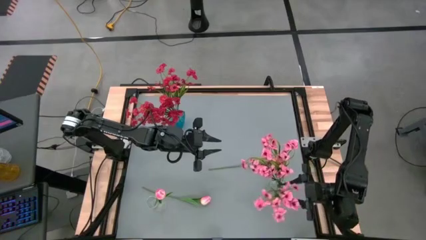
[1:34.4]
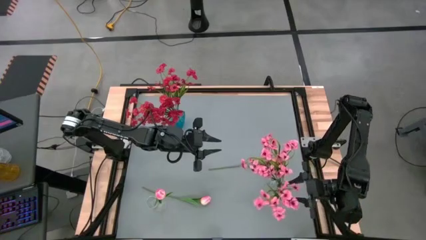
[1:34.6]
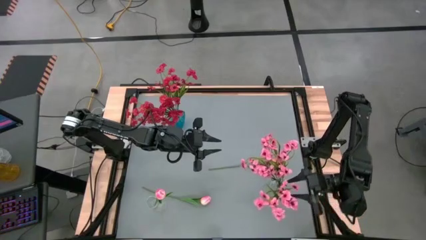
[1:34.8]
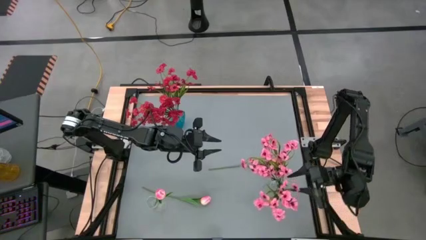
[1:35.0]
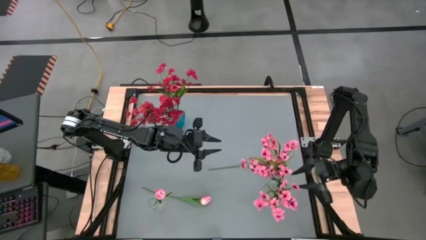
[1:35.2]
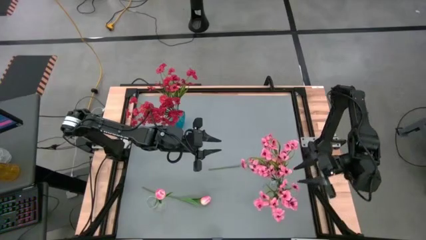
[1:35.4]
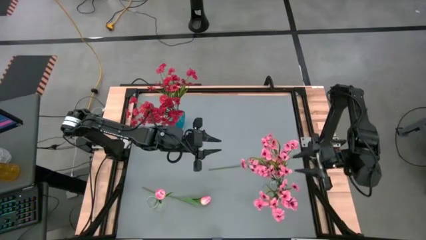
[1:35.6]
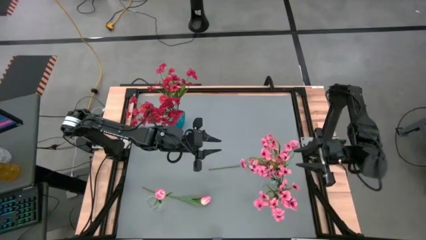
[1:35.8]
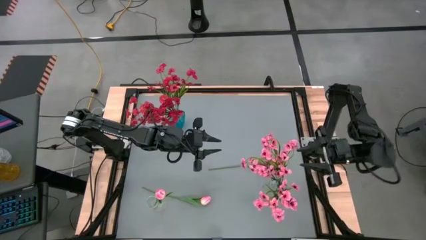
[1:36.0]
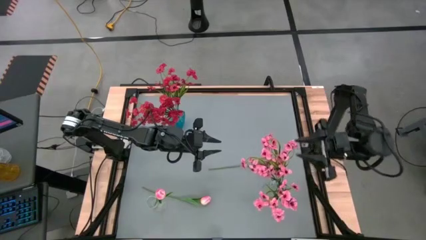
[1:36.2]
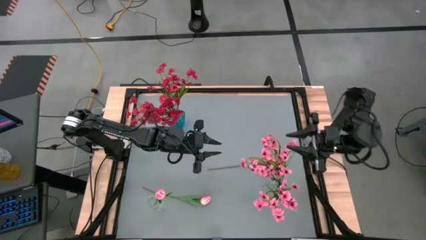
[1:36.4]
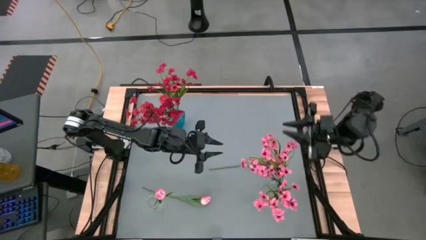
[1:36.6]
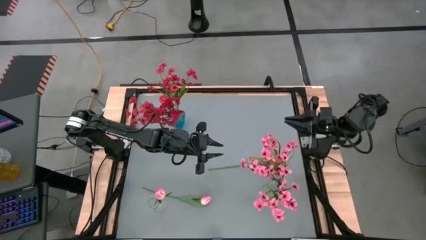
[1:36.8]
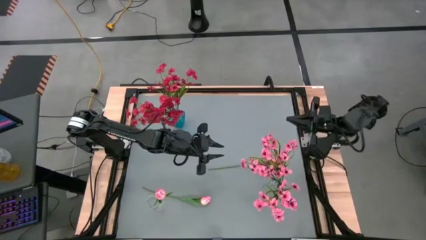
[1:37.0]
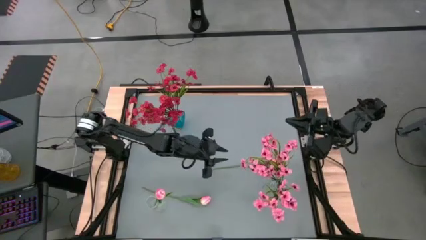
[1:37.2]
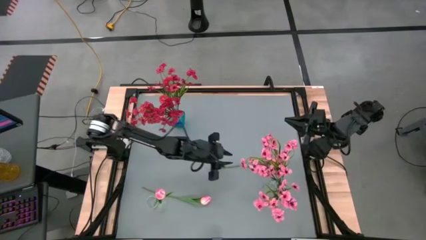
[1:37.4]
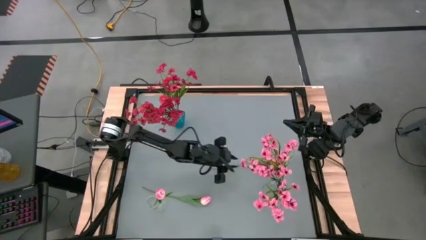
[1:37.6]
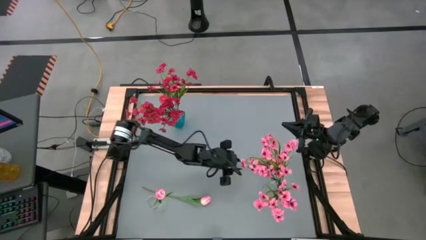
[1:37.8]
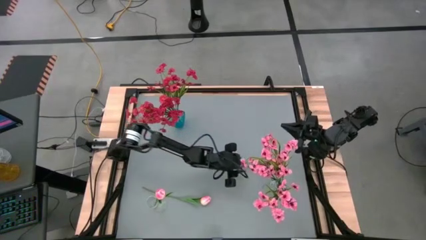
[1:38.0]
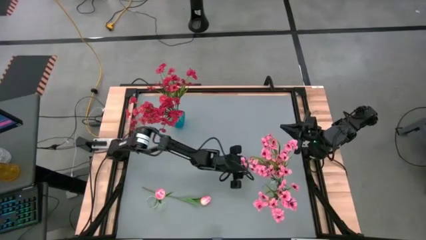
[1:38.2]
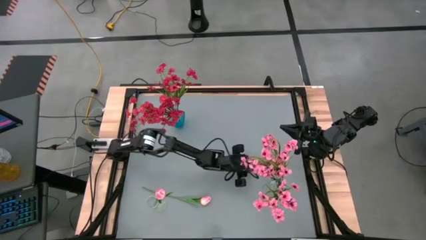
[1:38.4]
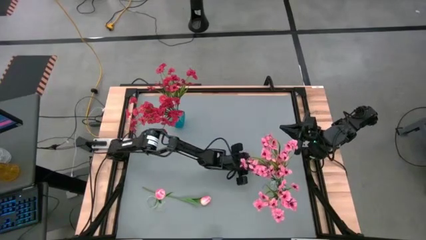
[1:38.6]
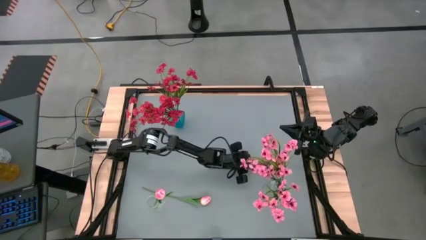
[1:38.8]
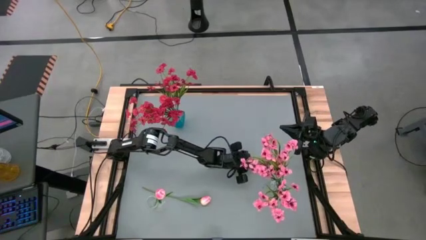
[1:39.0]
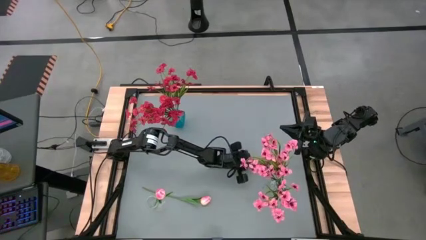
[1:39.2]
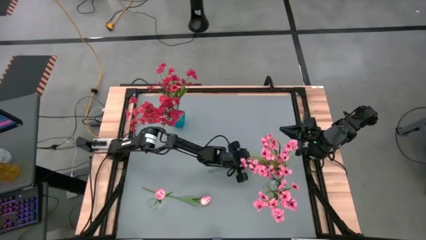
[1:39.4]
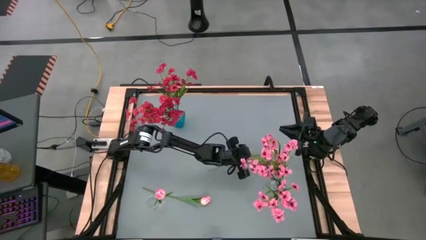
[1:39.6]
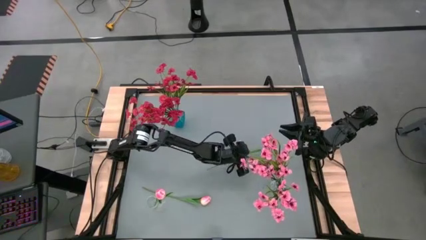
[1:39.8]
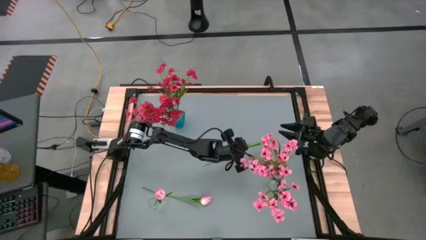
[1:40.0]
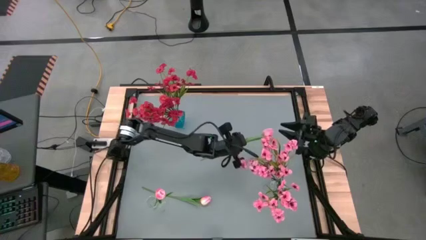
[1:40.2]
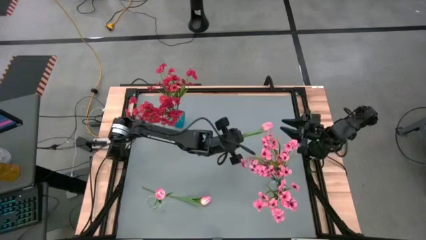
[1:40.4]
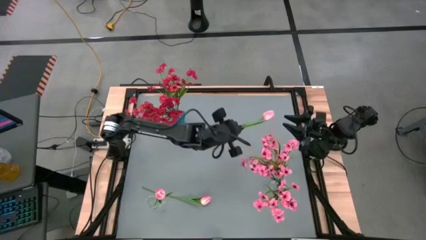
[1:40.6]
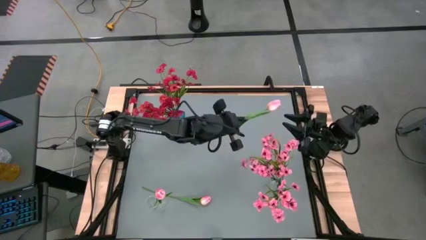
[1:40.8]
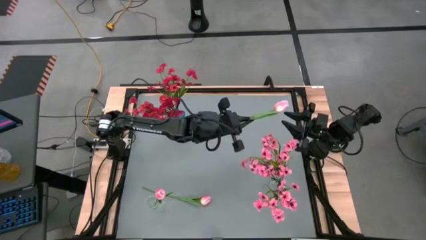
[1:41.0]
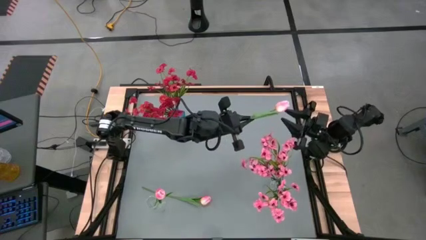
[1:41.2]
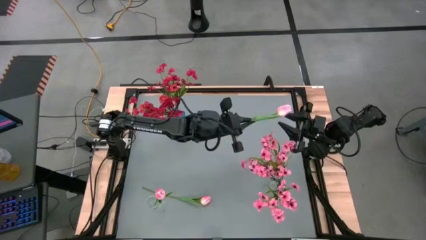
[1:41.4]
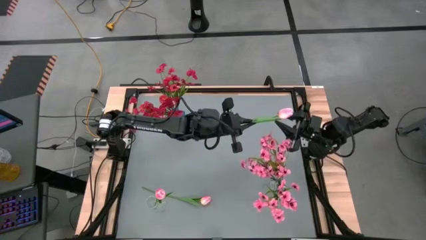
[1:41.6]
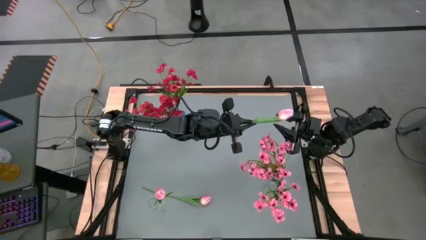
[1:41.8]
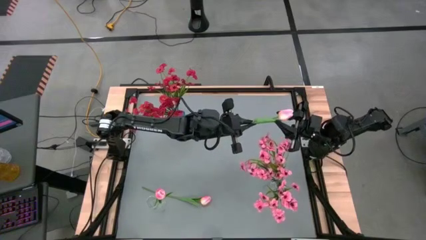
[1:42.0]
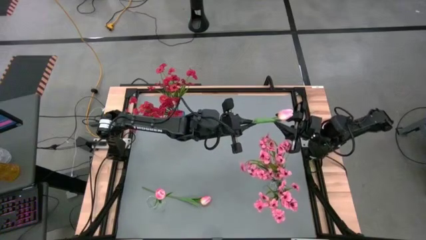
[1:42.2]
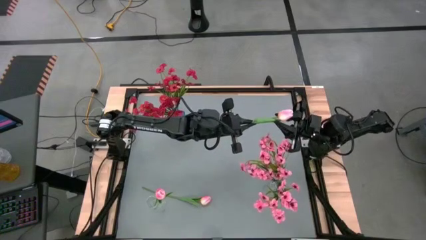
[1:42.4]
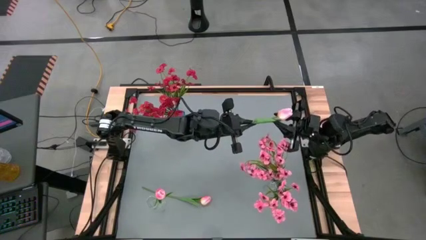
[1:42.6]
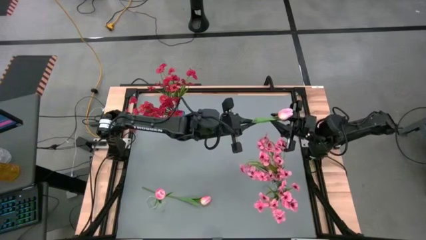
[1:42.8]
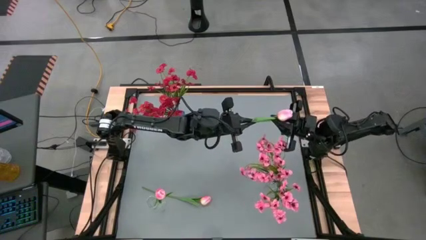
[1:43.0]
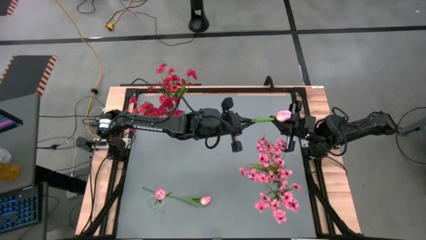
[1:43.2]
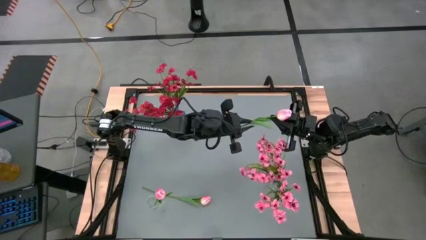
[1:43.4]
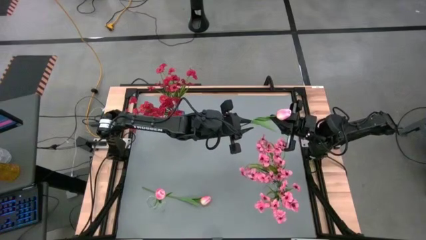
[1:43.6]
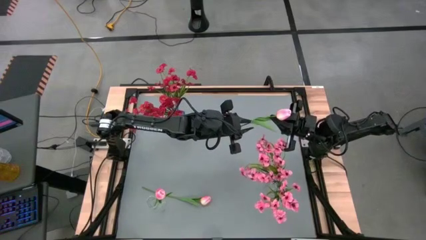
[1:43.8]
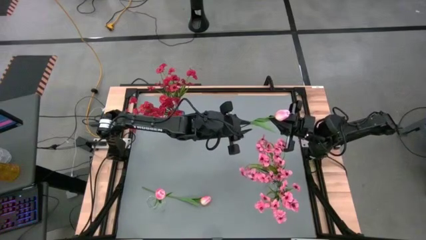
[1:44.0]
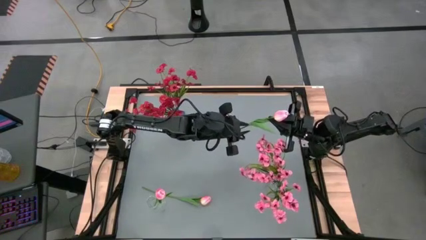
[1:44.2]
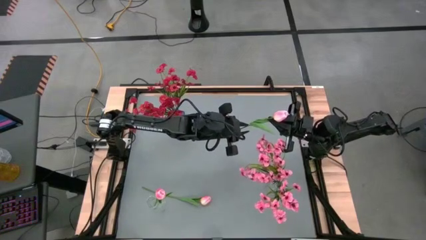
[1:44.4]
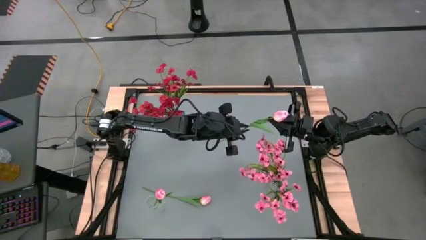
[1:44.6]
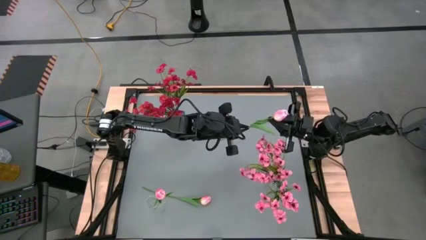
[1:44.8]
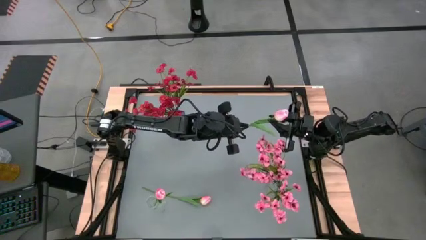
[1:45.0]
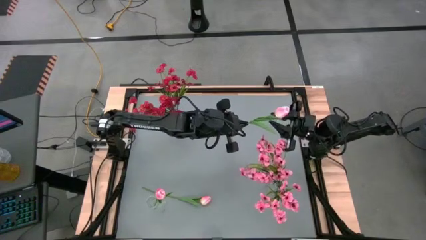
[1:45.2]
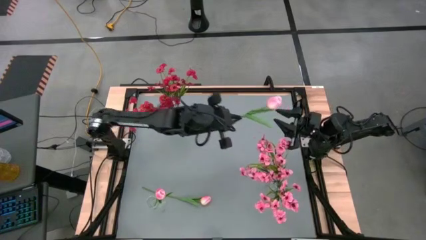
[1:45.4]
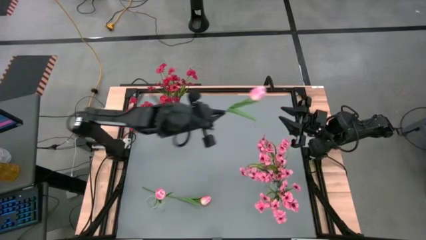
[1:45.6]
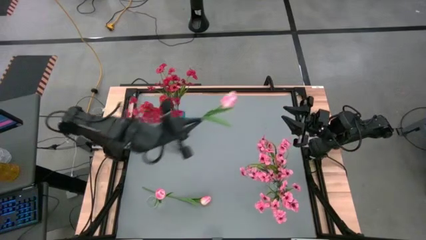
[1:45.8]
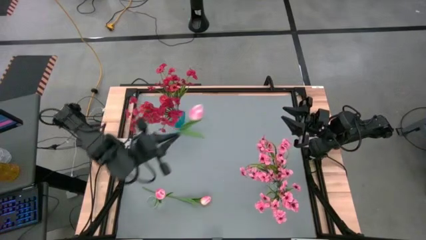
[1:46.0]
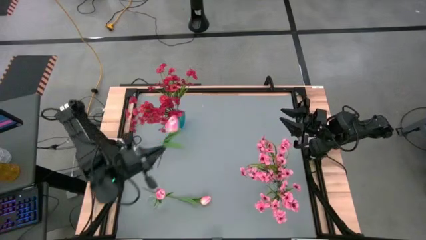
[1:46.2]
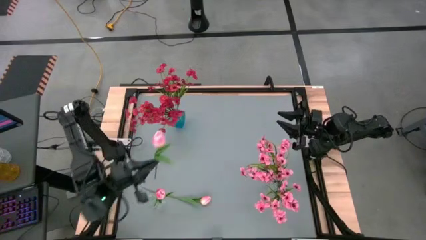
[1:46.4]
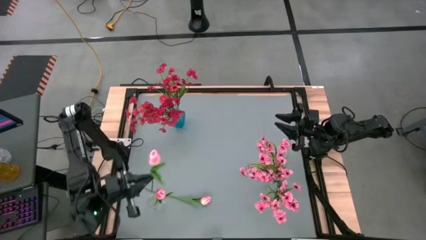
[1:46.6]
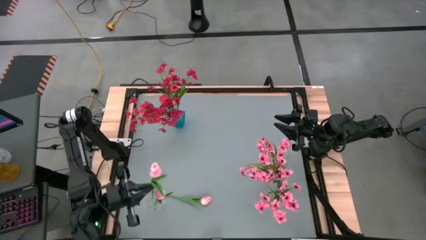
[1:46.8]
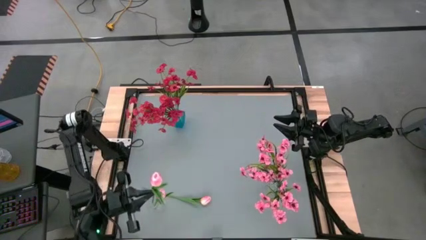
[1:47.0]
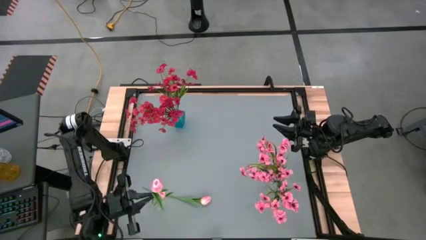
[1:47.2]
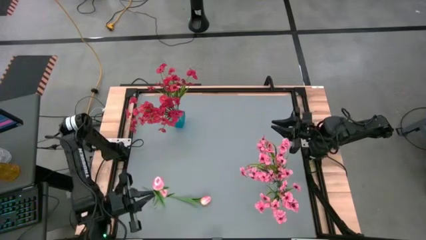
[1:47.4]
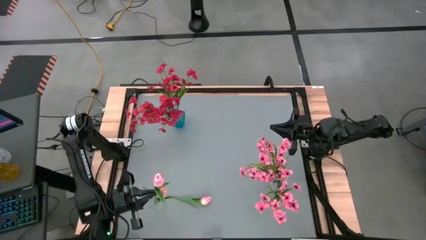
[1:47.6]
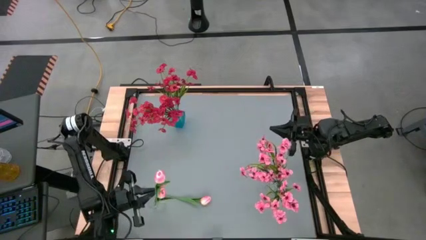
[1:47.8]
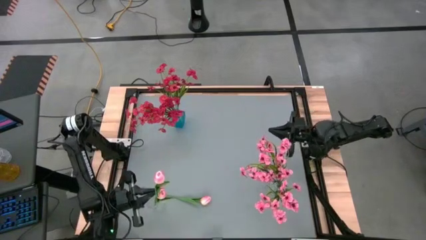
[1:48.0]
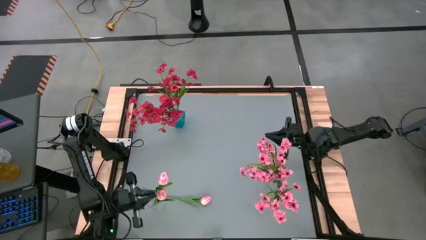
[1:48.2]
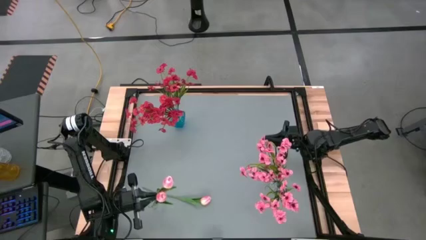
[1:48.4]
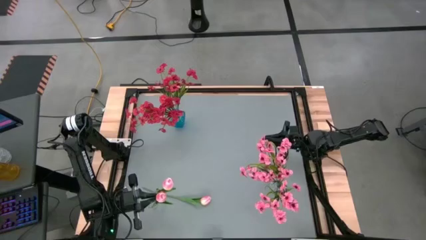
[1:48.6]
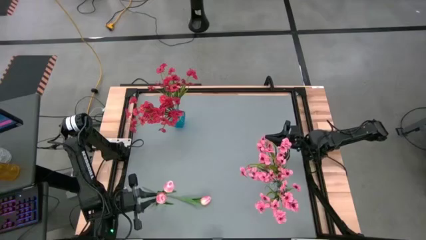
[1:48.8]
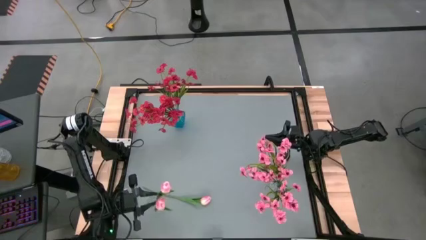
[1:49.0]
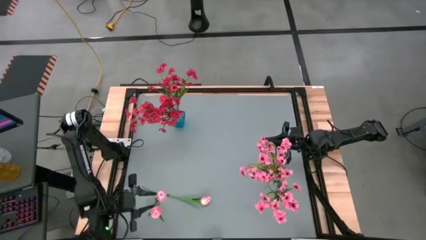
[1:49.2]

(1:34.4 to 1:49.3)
Task: Sort flowers into vase by color
Put the top pink tulip into the transparent vase
